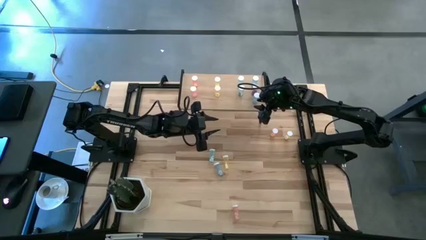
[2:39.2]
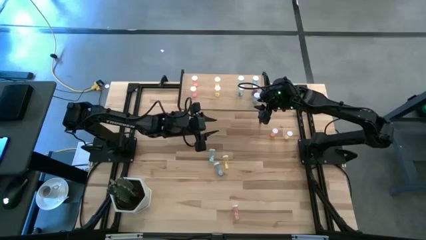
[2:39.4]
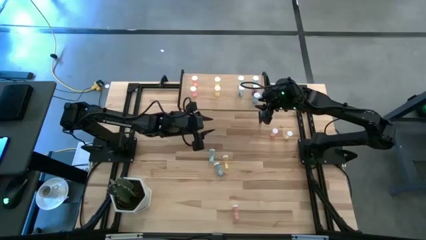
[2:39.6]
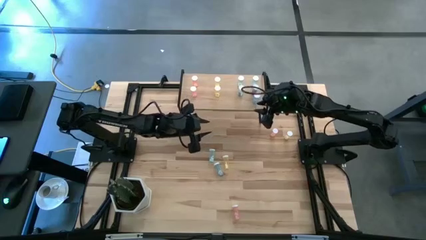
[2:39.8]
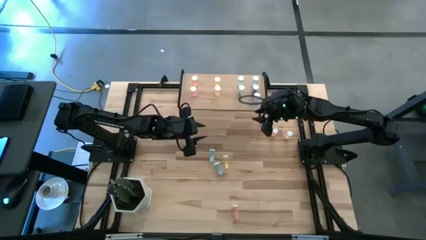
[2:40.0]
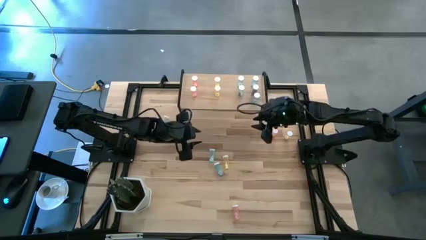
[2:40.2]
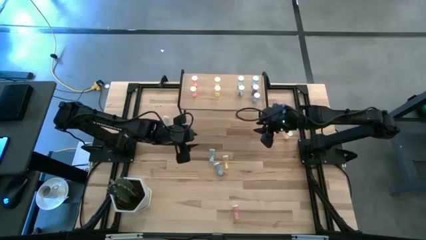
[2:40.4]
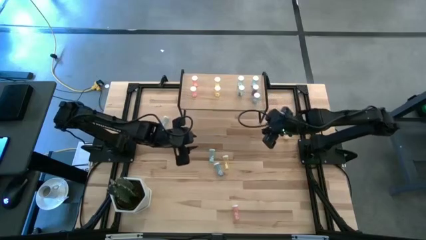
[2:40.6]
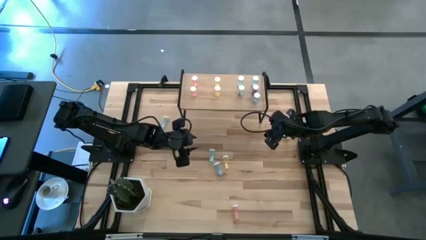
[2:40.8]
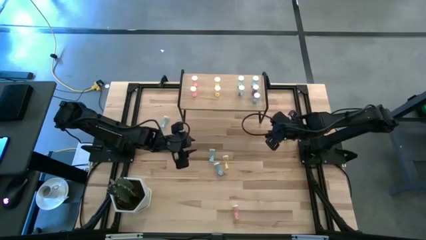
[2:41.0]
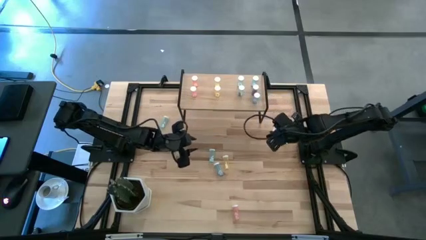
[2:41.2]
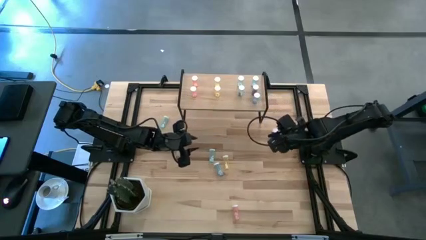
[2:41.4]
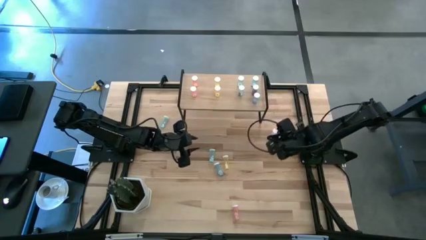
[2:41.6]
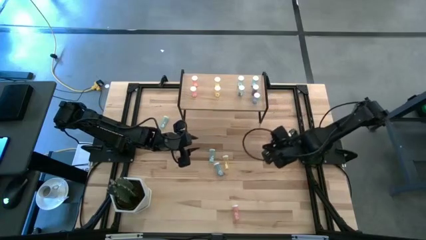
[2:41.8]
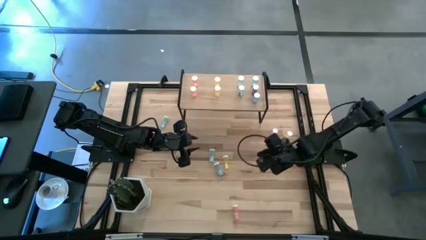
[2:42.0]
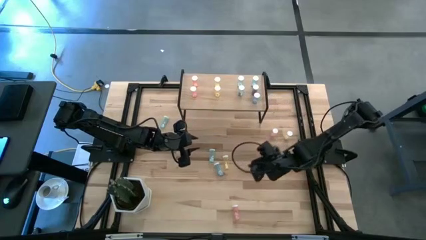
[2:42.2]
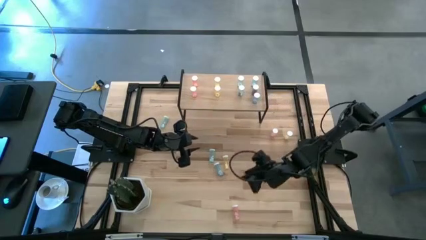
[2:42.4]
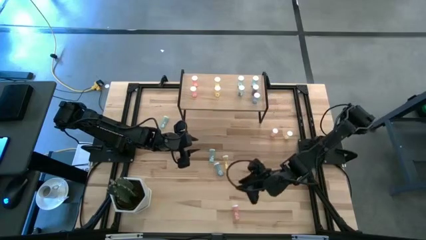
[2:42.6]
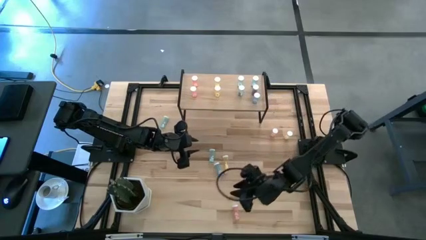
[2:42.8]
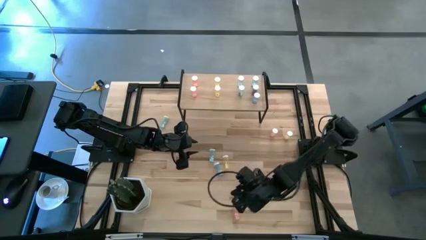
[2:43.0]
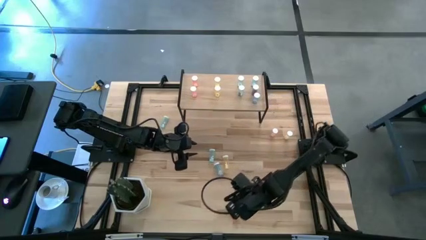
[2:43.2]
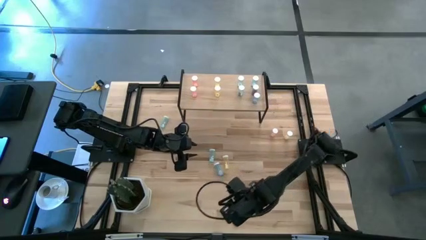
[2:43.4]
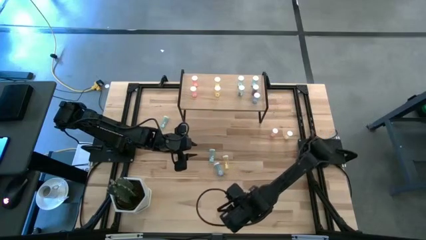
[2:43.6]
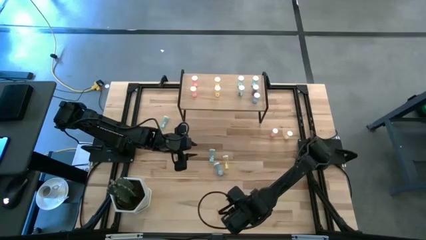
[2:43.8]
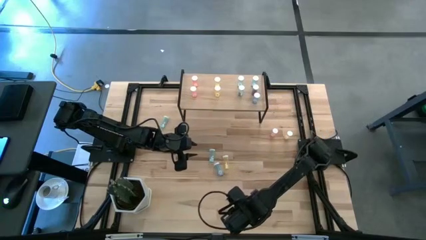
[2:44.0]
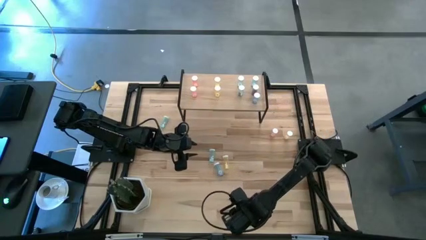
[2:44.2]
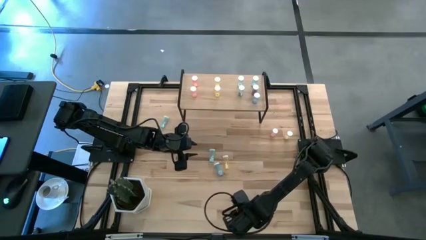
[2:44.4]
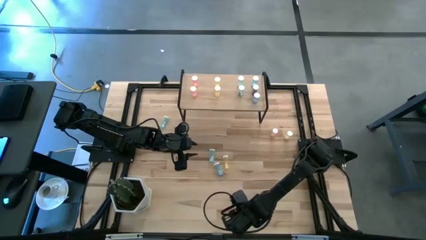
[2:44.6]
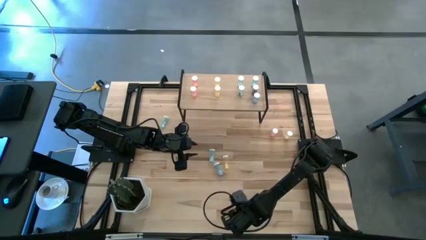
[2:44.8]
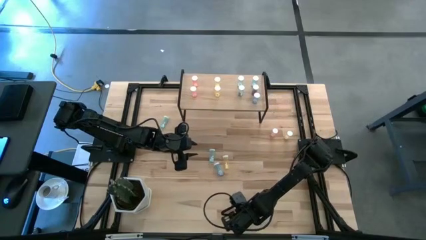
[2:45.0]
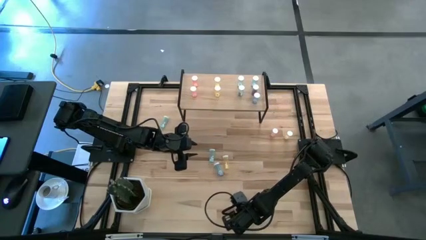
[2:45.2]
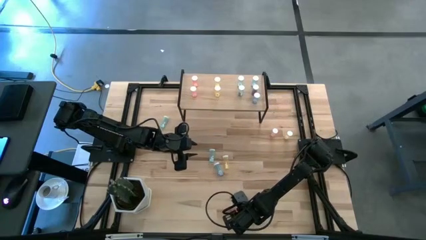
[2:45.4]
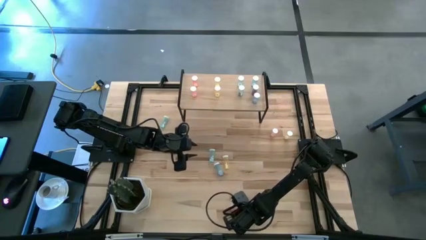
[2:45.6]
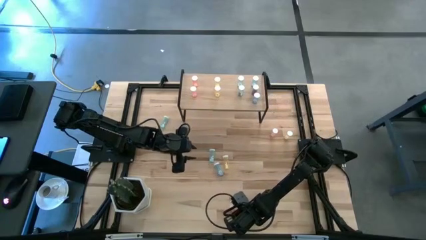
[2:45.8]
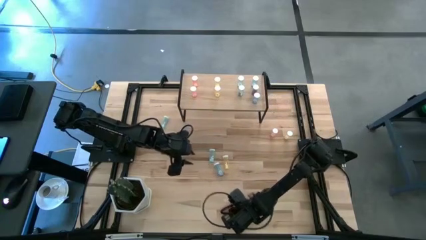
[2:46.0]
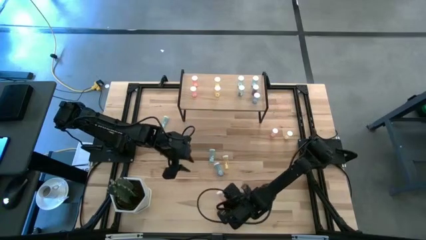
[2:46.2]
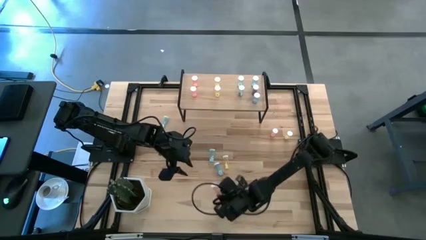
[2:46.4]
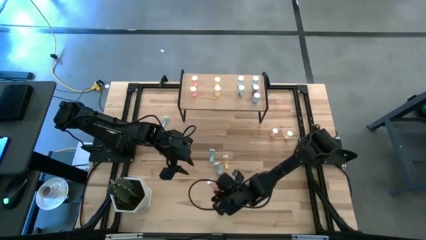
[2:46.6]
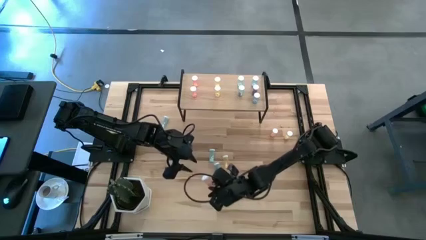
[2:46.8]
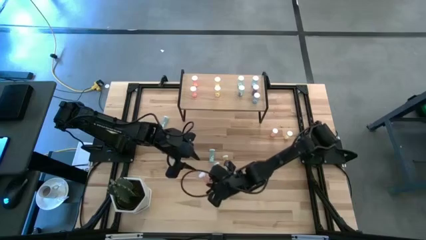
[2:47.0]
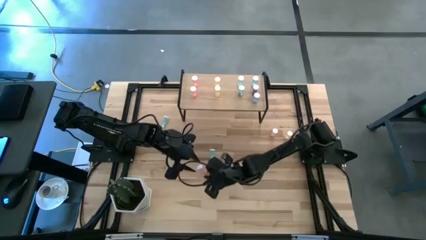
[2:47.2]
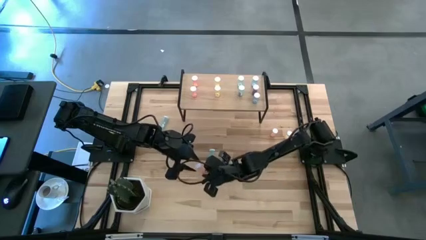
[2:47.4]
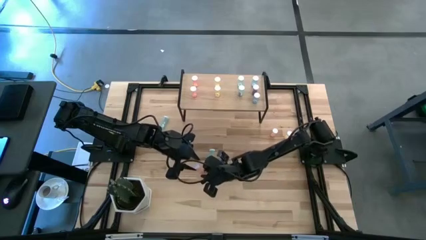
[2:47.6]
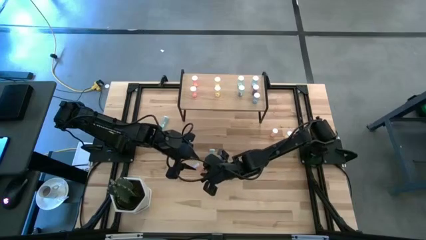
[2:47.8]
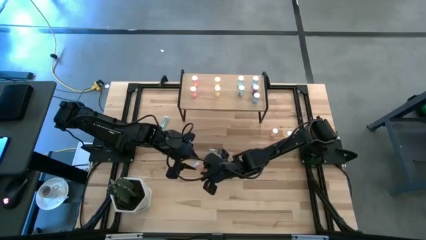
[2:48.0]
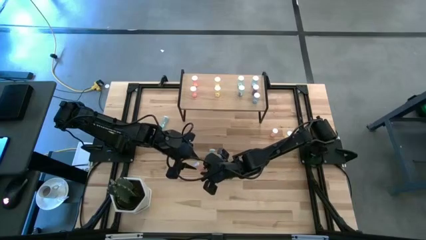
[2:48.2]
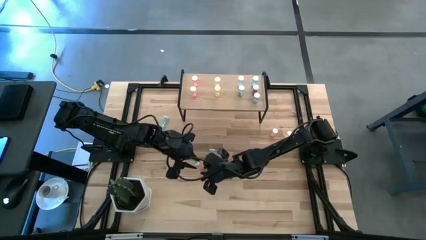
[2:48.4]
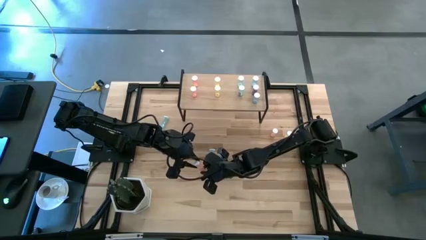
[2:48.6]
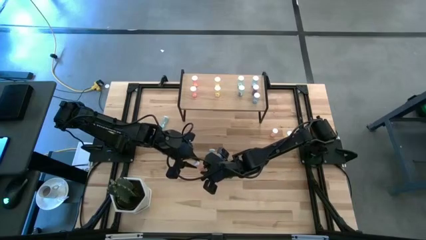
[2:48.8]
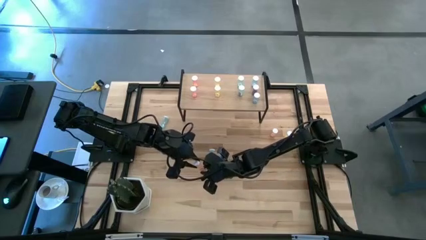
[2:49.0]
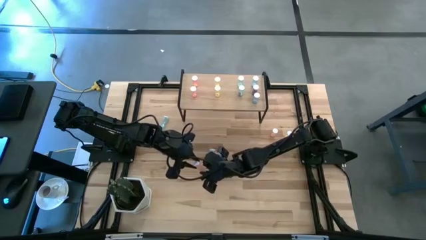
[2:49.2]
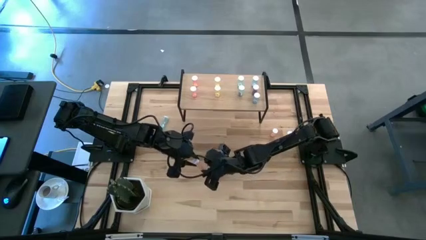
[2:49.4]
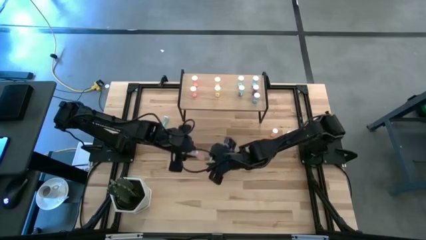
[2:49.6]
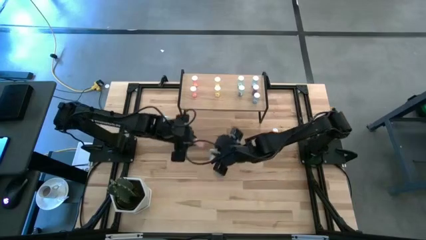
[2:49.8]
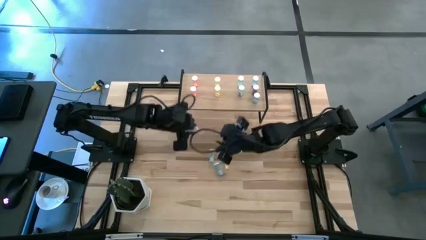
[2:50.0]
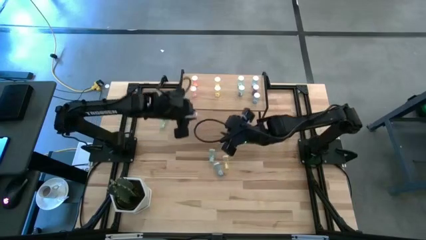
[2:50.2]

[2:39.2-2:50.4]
Task: Pick and place medicine bottles onto shelf by color
Put the pink pill bottle on the shelf aligned with the other pink pill bottles
